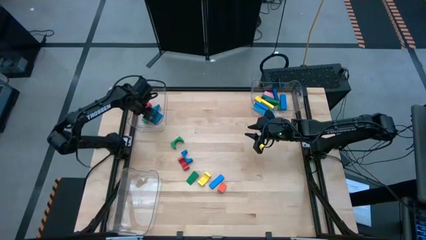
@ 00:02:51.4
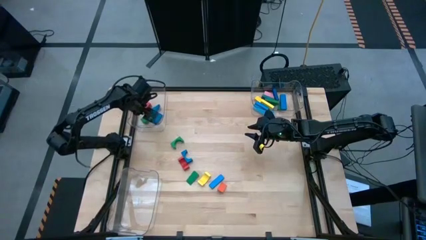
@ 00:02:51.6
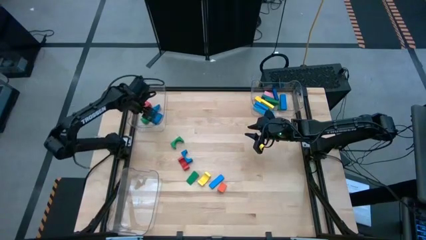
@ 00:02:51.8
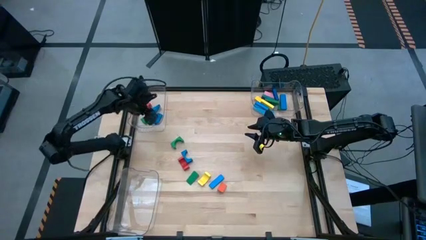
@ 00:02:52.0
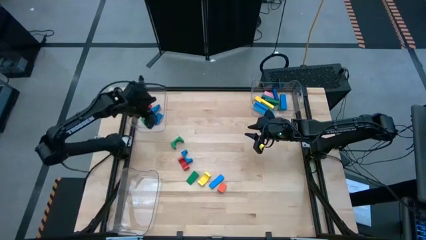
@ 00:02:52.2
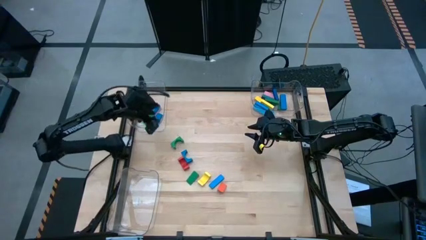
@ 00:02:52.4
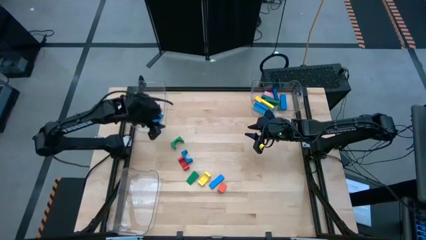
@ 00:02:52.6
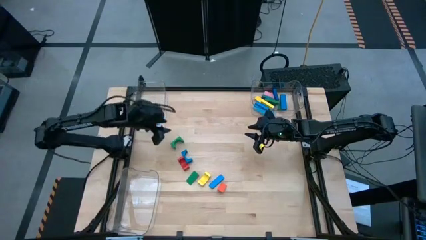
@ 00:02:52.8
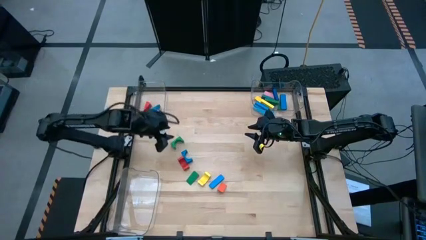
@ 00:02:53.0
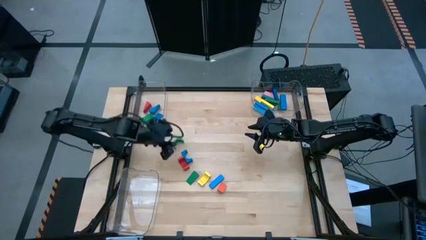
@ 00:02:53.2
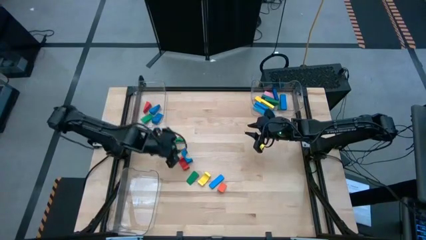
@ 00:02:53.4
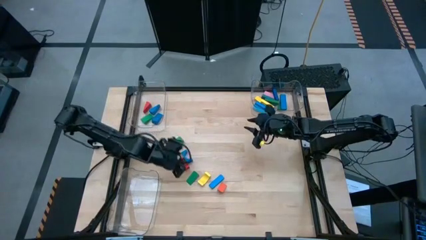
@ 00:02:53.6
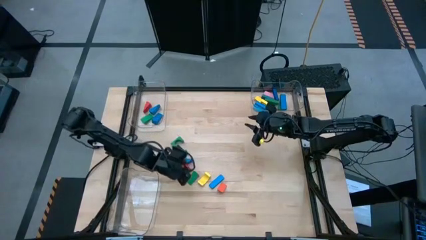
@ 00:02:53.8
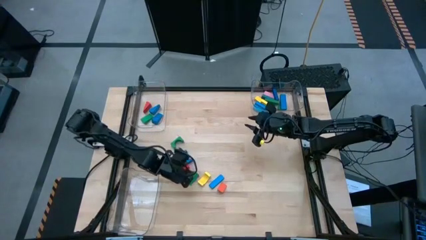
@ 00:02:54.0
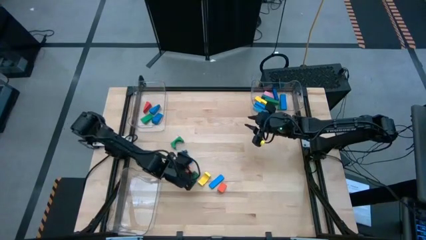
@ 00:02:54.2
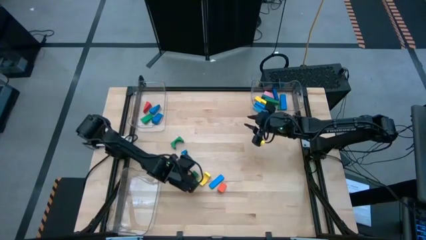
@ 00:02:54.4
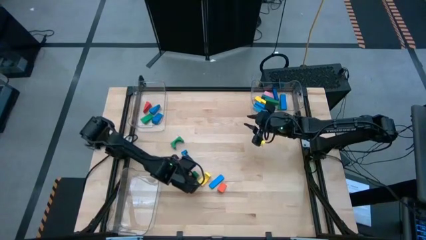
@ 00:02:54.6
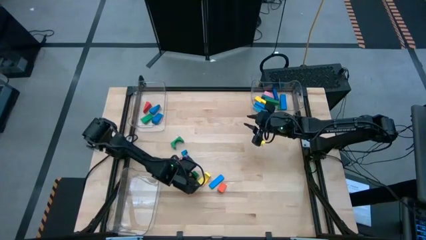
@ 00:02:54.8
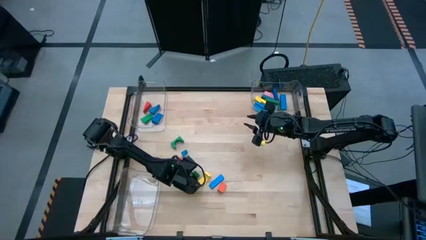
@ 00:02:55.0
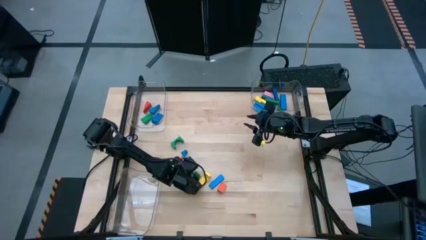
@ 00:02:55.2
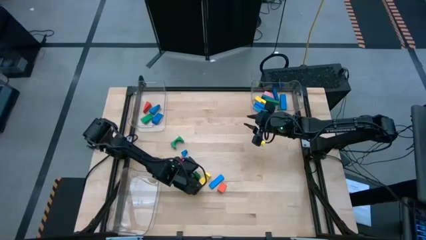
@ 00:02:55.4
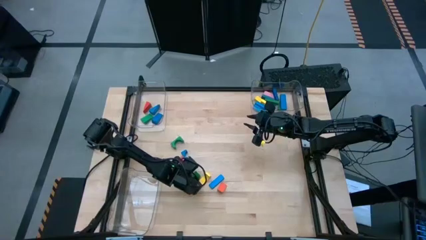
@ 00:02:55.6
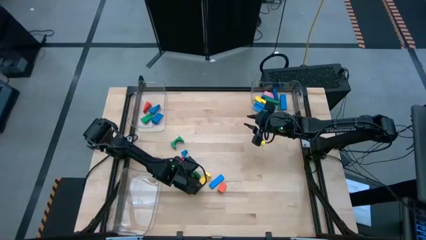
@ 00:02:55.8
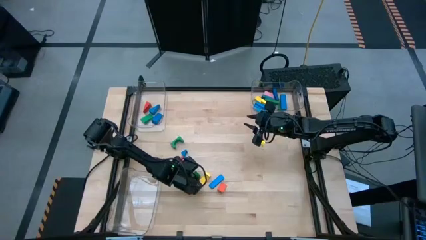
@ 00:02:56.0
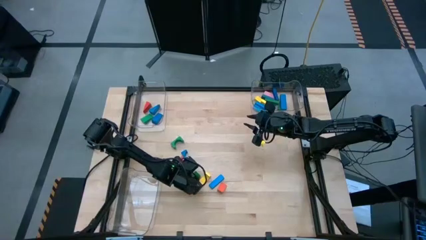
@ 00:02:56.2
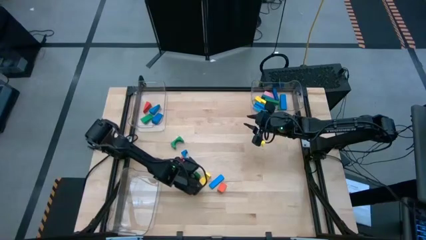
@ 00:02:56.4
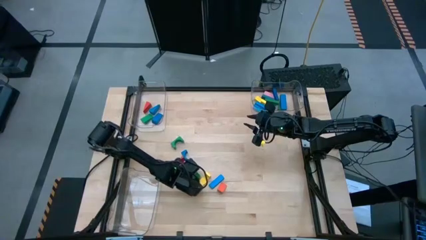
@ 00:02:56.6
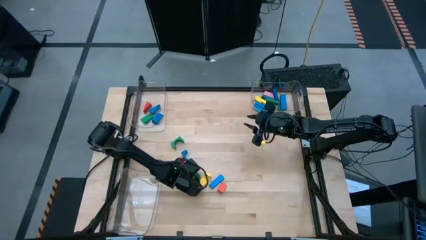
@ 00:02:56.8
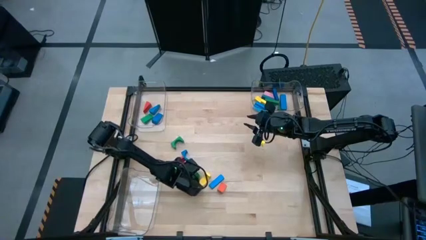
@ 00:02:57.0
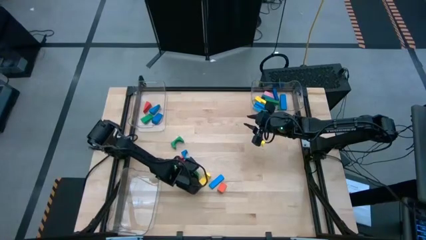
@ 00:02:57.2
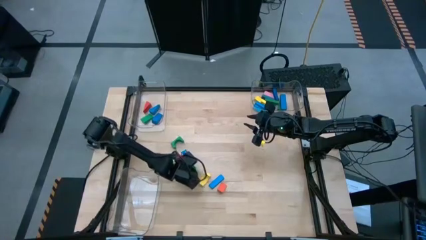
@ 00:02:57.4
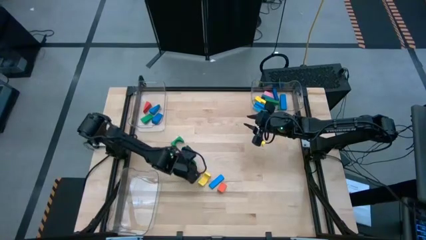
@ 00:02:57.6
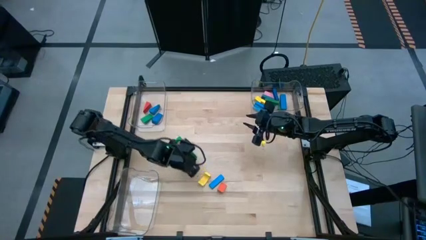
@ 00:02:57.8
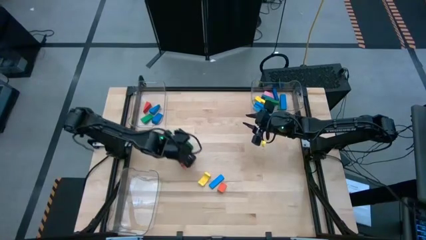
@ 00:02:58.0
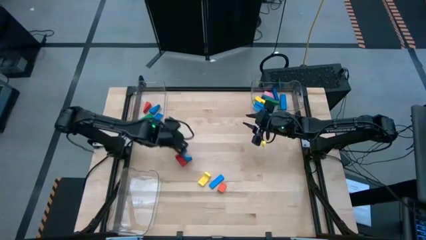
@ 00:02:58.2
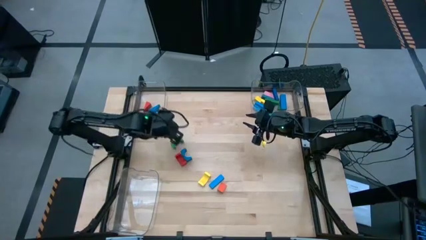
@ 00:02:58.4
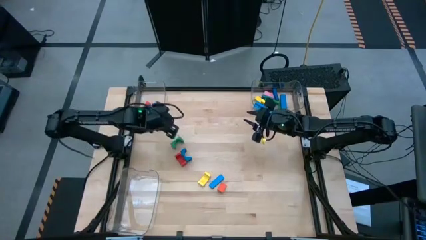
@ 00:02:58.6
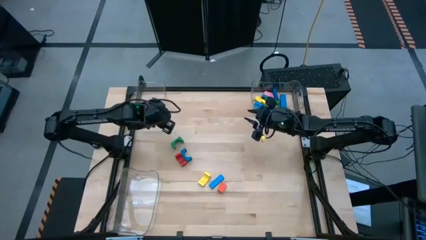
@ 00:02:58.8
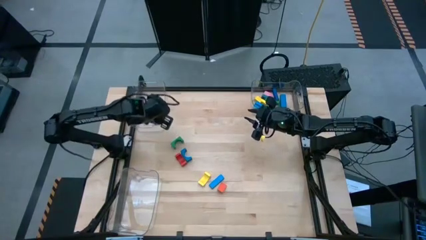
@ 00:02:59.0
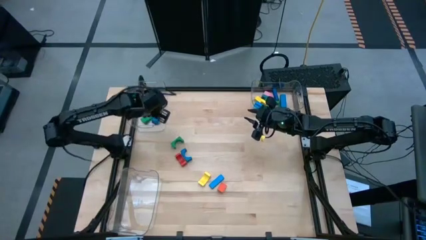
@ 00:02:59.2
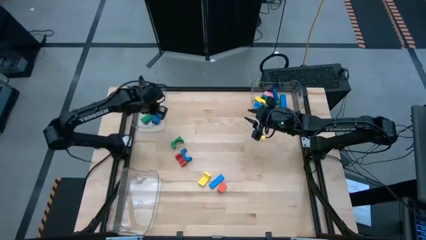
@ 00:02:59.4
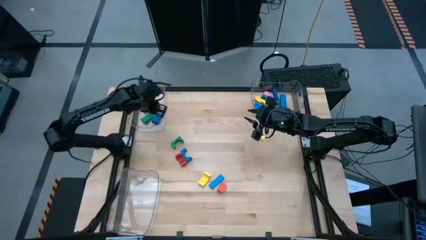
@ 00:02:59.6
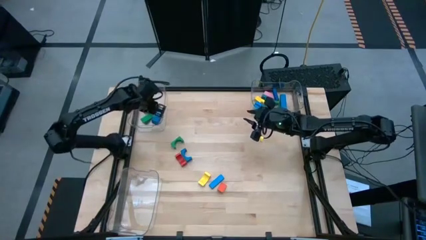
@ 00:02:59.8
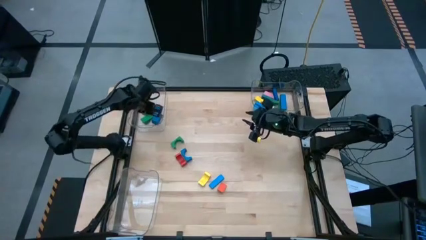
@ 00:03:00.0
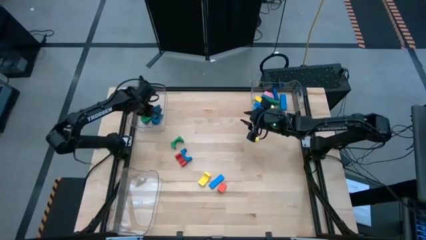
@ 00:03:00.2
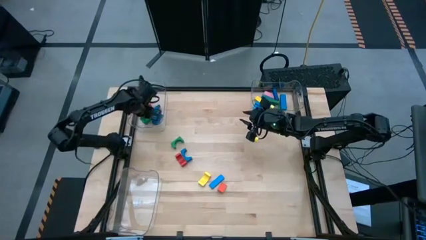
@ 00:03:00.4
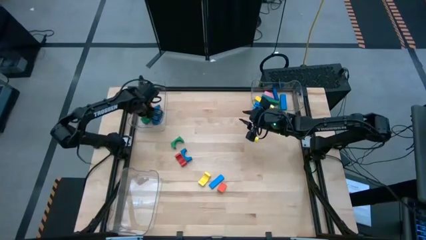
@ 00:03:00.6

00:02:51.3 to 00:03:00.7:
Task: Sort blocks by size
Put the green triangle block into the top left transparent bin

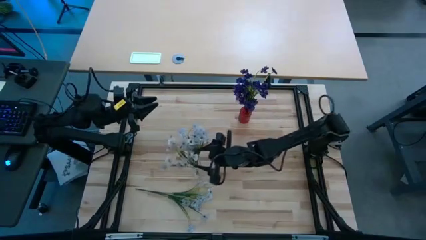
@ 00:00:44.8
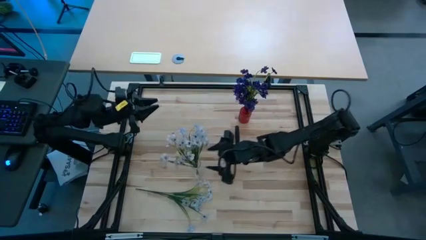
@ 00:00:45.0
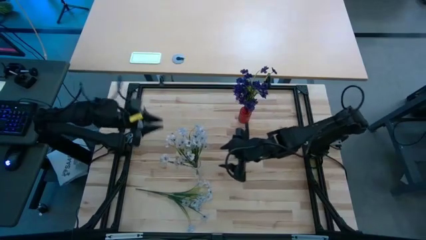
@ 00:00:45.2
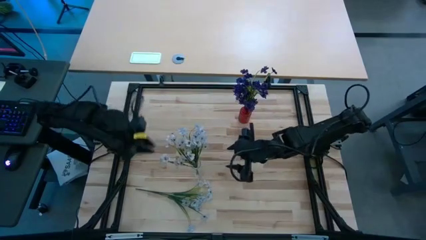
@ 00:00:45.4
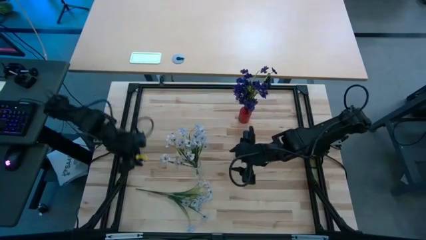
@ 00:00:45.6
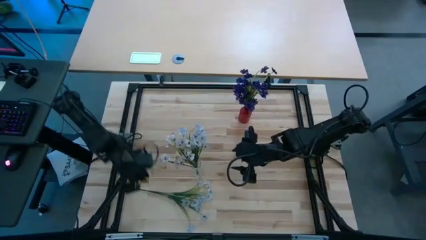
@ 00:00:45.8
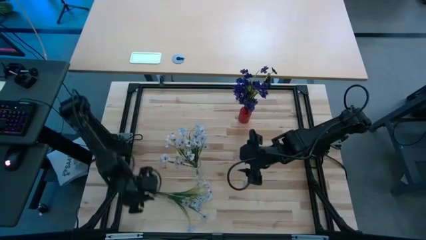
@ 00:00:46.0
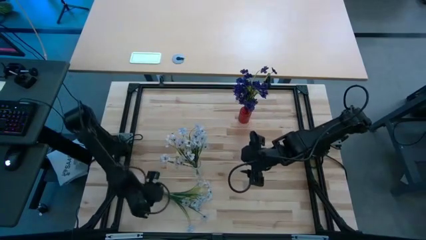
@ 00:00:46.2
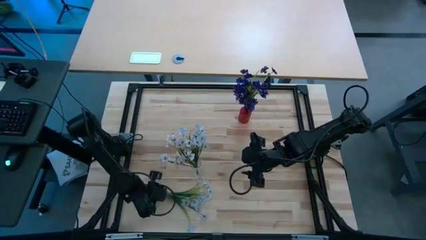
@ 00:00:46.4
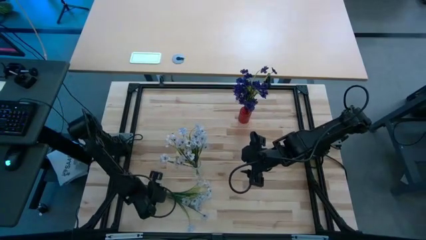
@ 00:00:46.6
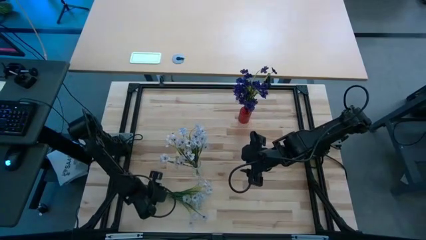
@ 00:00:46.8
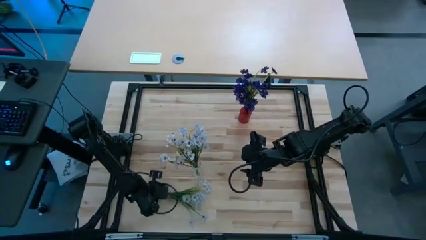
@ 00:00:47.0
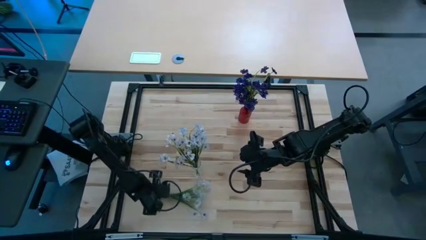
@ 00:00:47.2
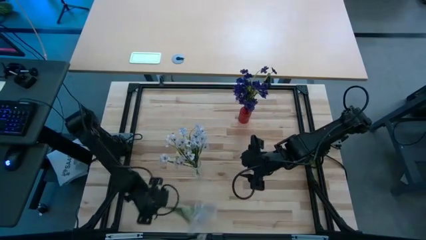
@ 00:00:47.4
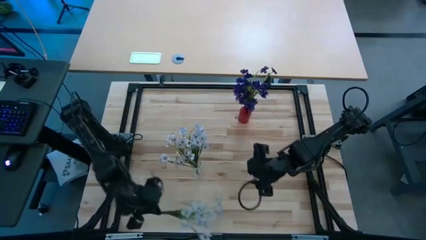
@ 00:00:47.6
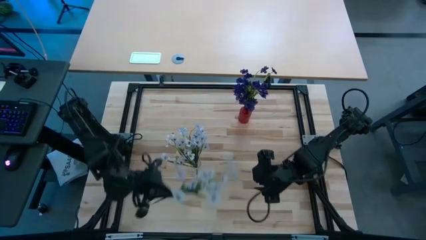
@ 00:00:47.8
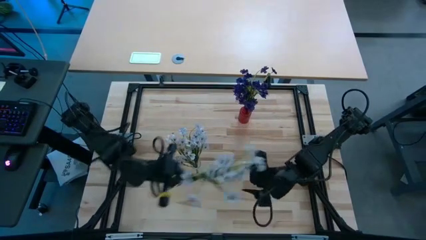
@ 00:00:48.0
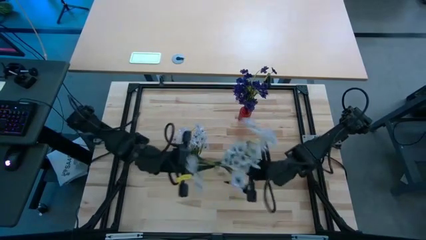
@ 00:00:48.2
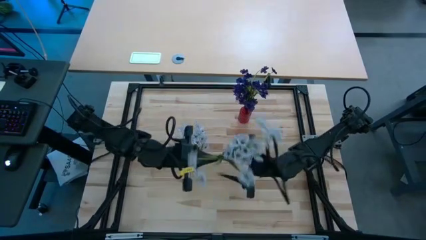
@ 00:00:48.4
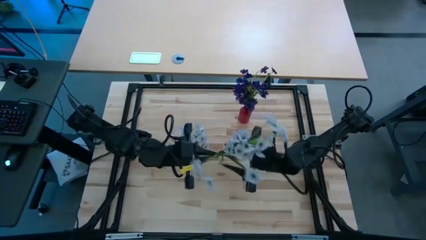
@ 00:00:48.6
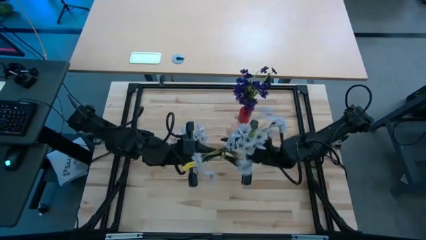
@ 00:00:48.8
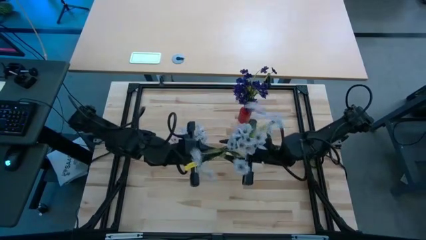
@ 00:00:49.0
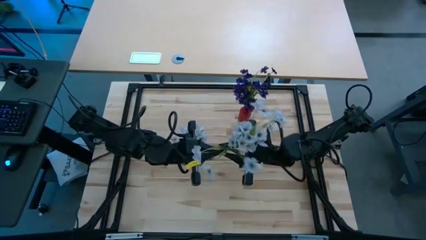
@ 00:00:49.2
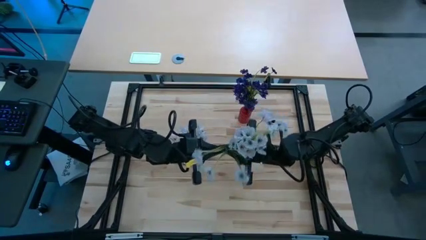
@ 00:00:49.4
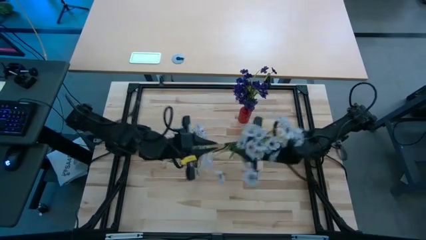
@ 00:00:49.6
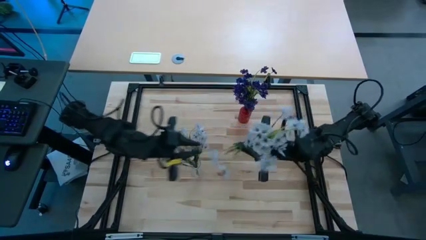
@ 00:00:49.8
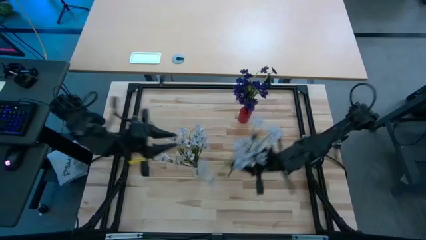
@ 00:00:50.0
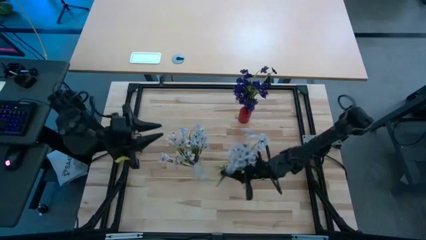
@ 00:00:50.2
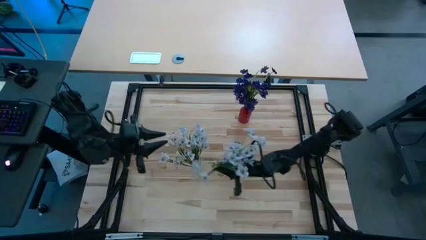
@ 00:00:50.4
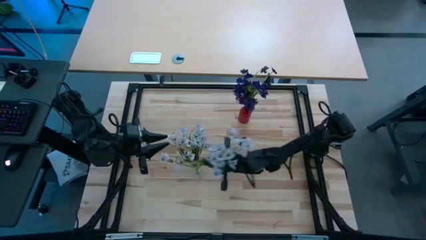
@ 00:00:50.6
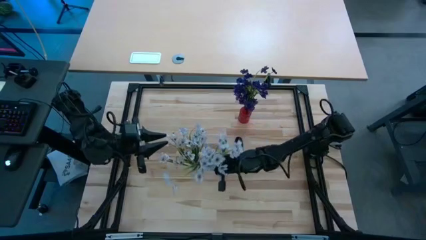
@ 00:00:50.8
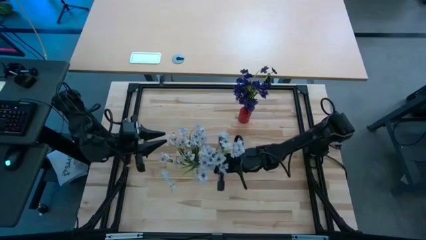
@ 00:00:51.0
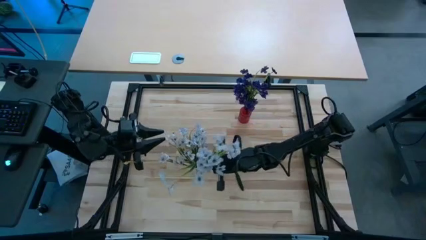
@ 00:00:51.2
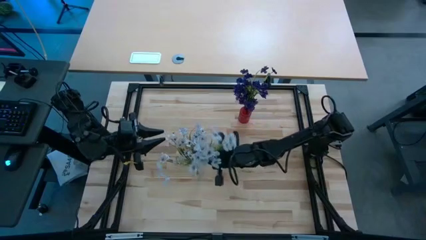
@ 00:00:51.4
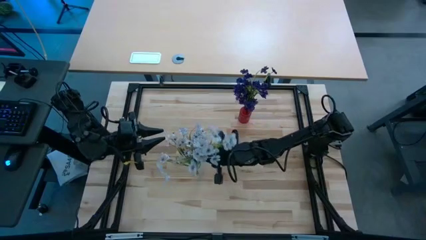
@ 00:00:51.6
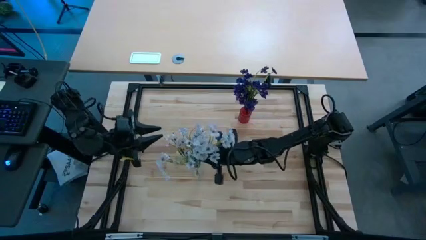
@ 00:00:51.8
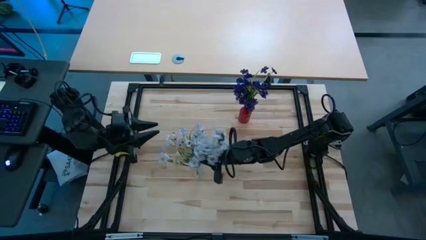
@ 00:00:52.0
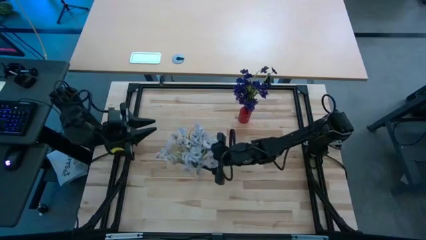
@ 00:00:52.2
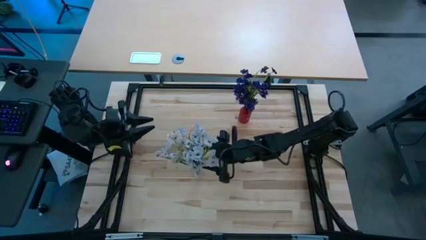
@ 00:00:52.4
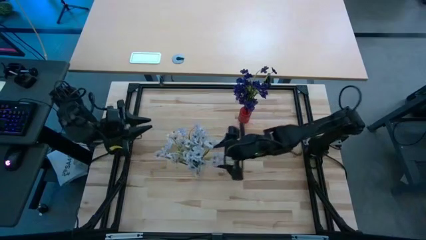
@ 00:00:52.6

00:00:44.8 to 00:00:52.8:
Task: Sort flowers into vase by color
Put the white flowers into the transparent vase
